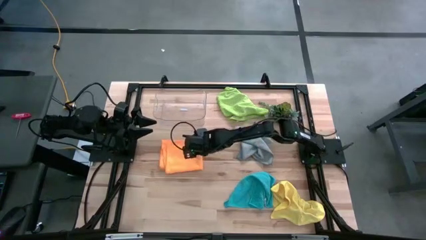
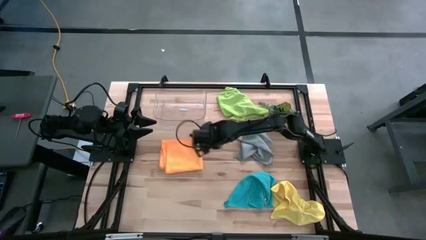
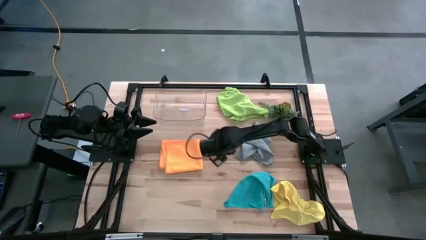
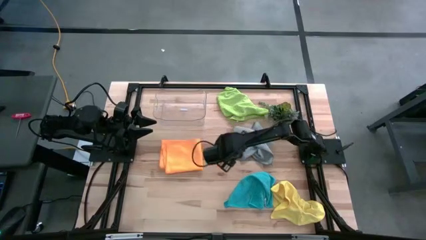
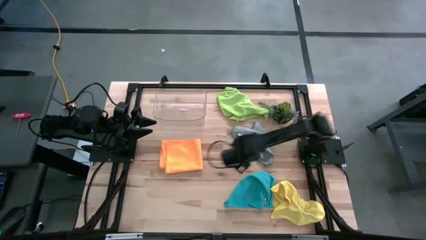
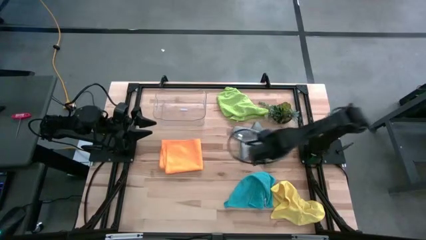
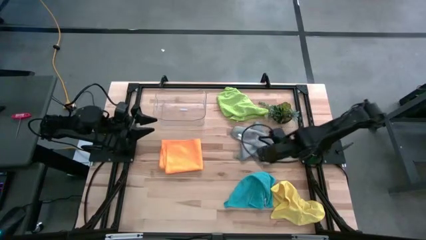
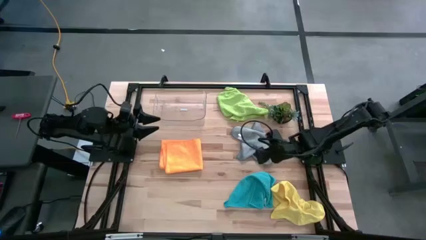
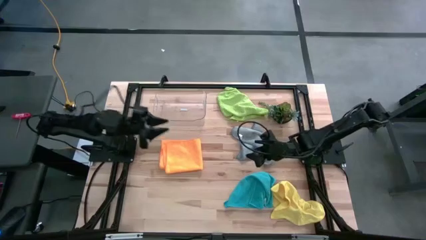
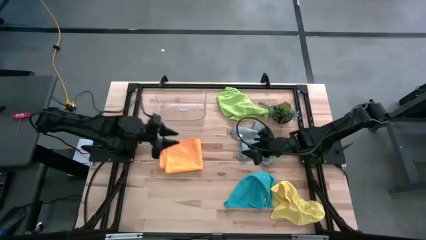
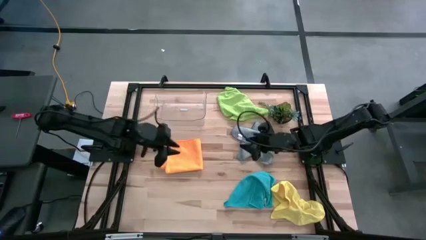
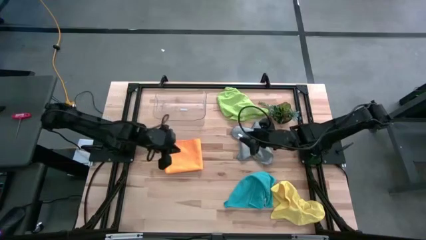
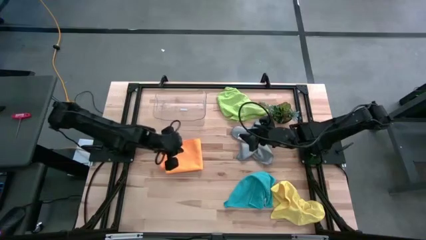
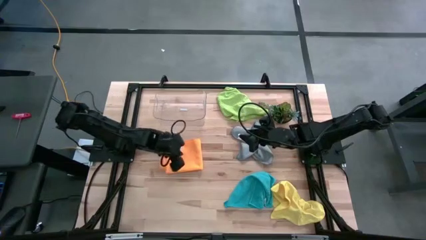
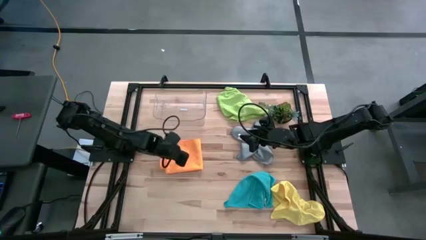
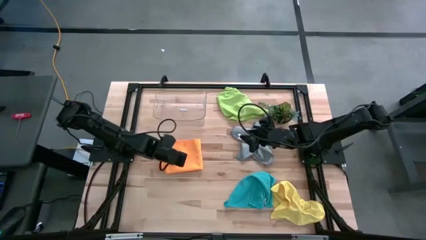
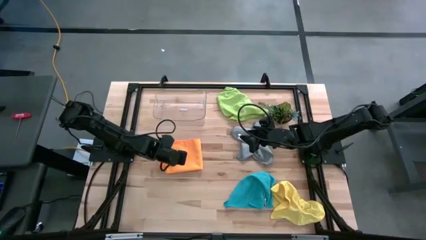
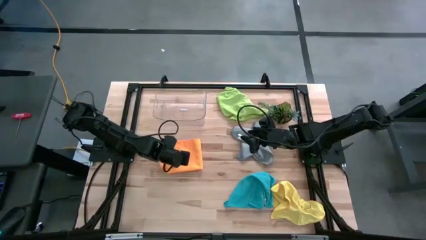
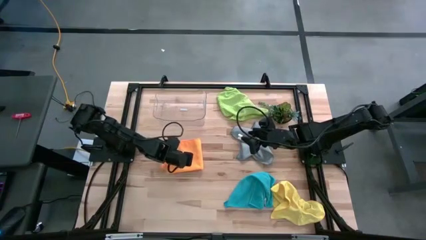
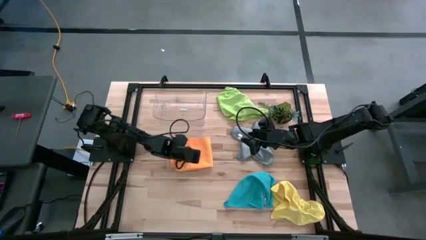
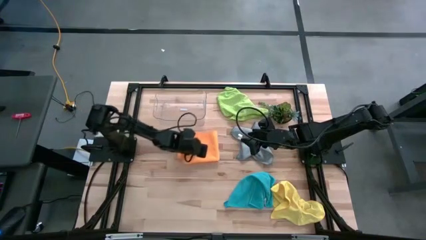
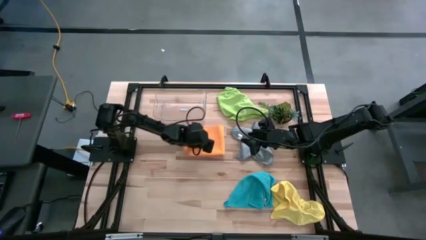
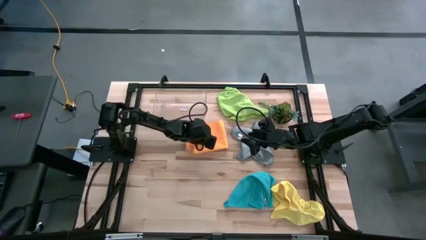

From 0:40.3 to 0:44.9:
Task: Fold microfiber towels
Adjust the orange towel

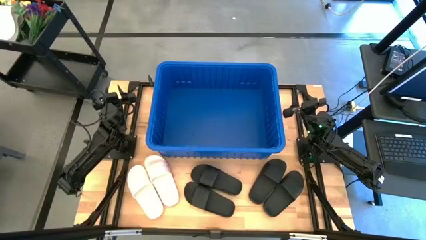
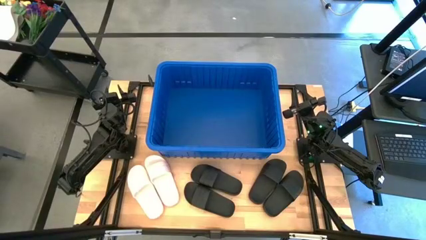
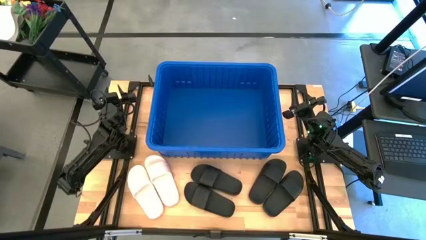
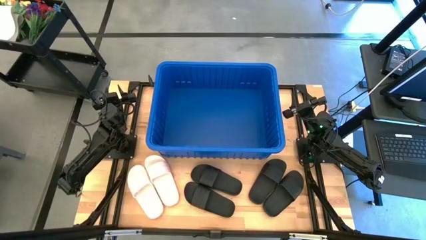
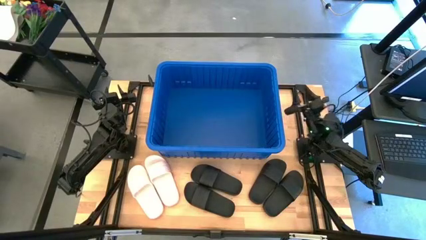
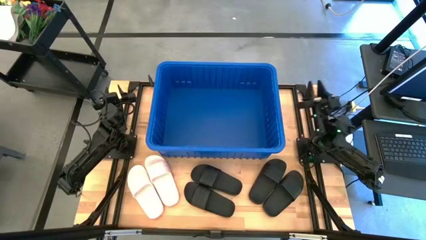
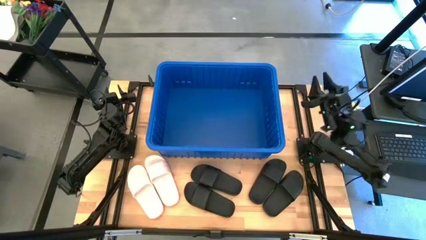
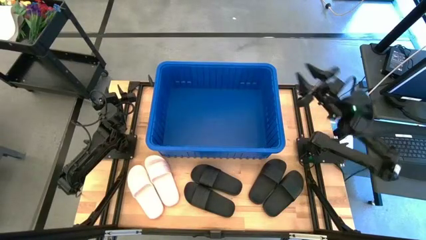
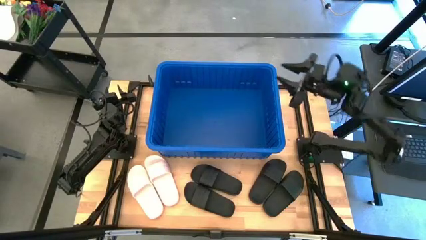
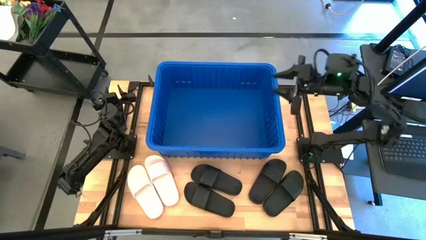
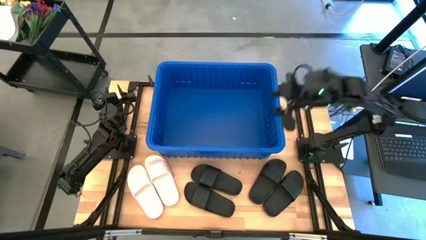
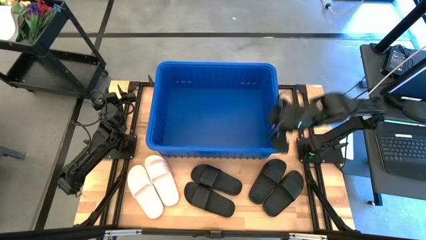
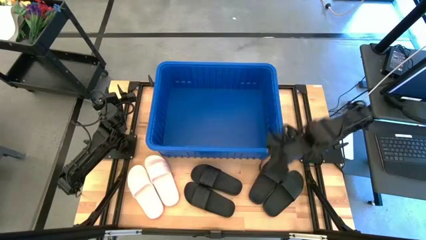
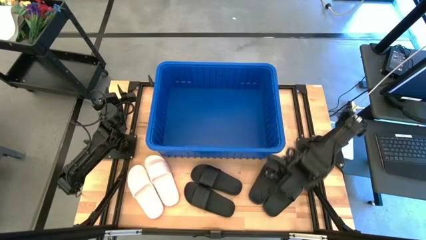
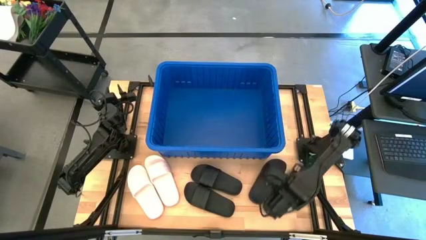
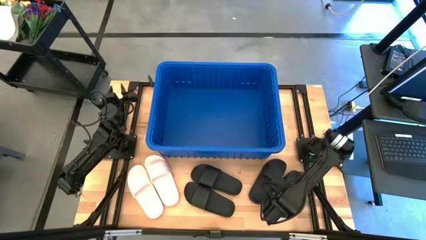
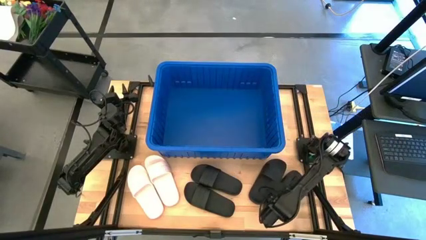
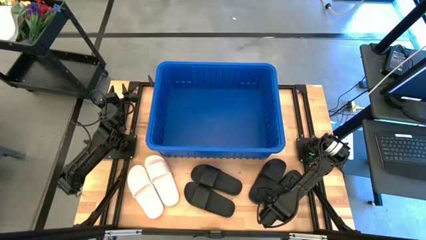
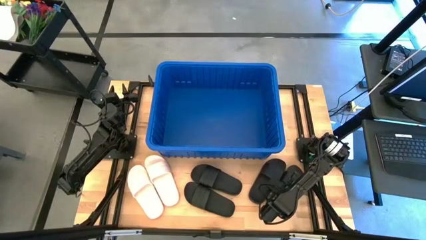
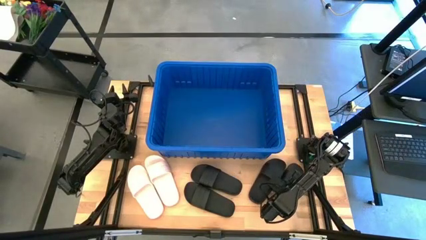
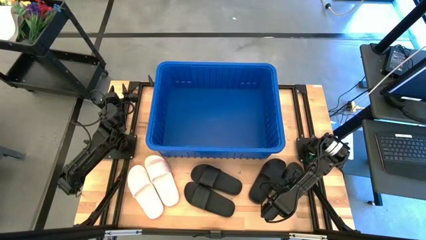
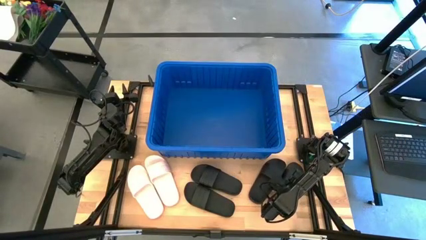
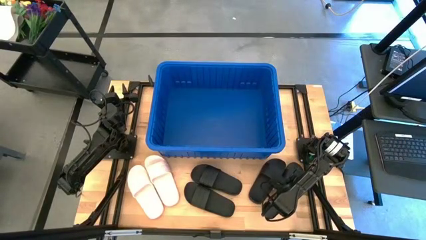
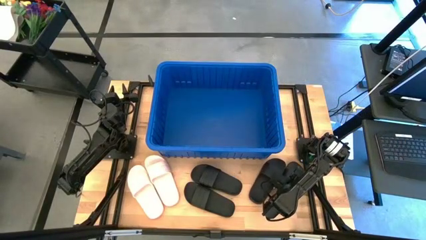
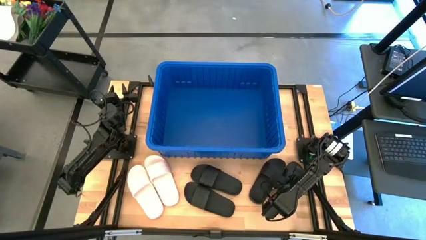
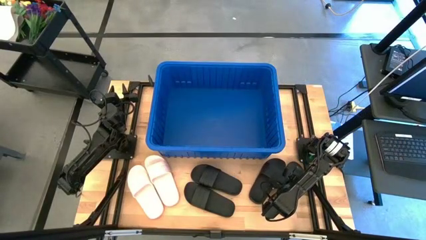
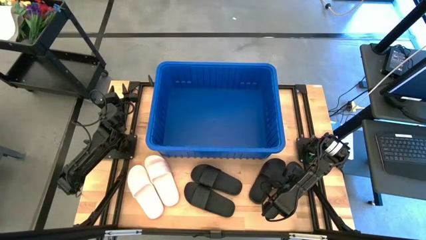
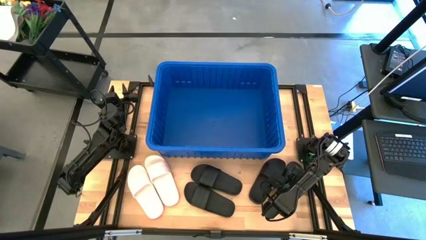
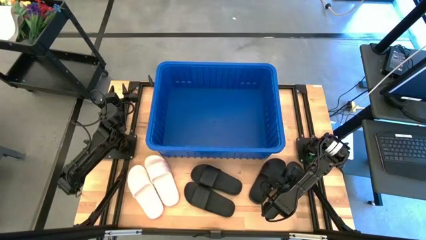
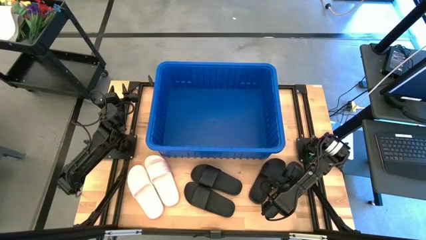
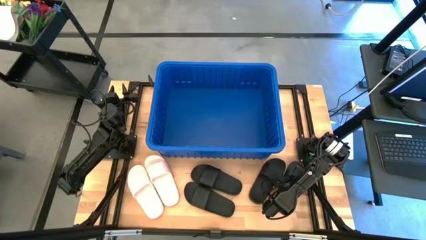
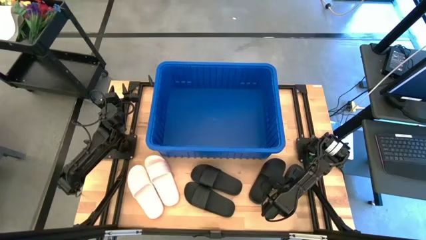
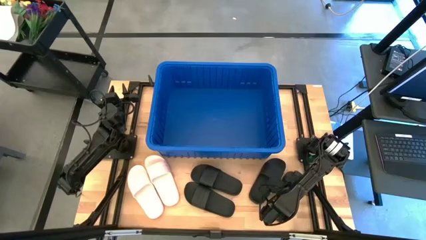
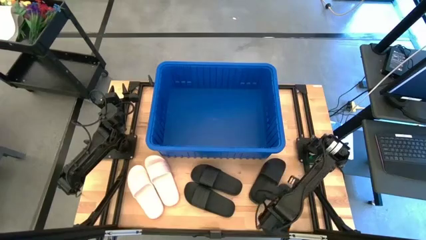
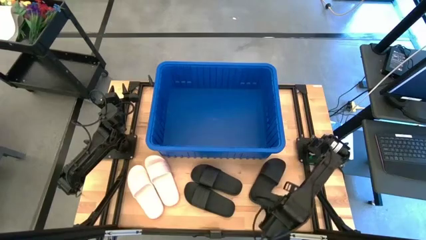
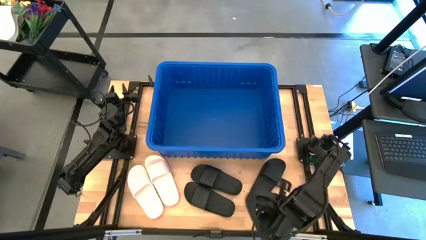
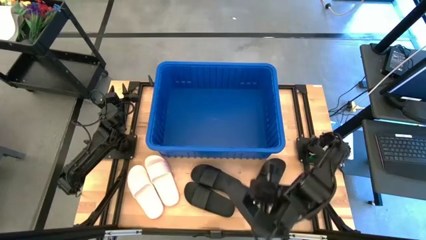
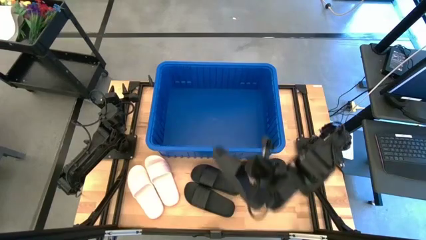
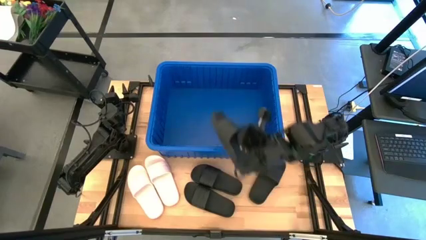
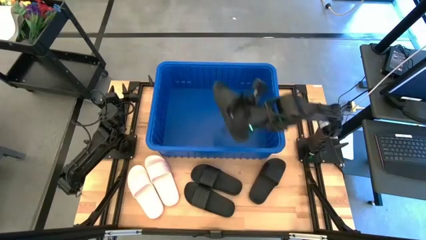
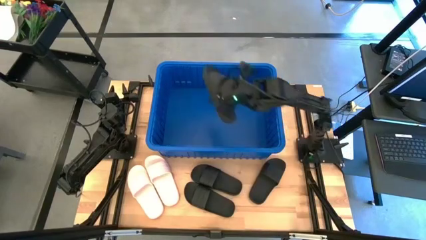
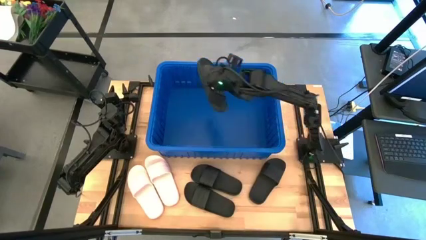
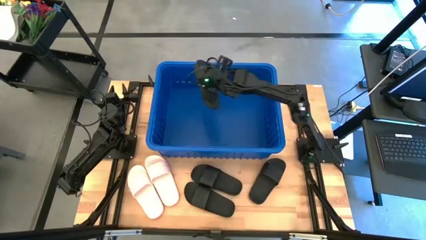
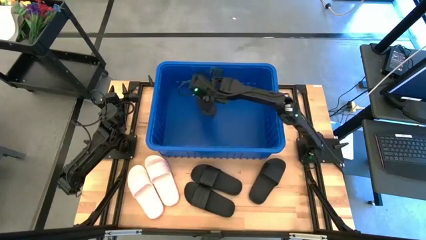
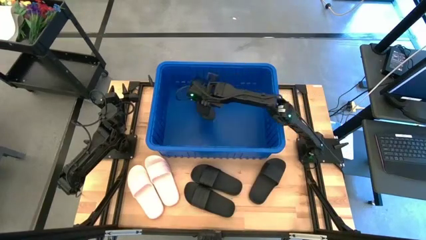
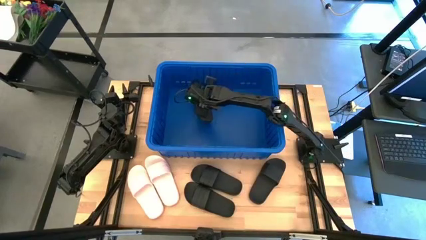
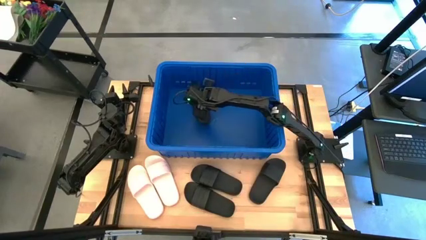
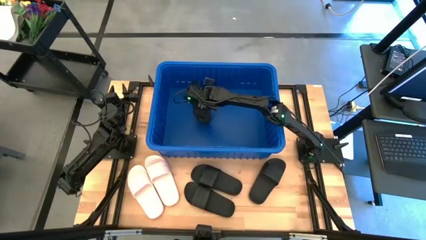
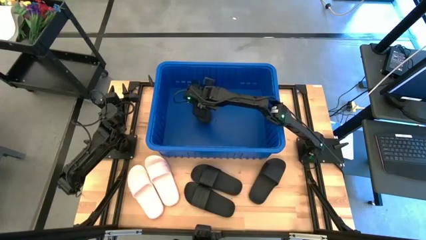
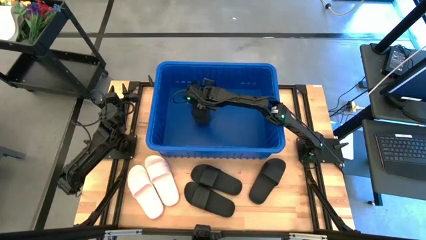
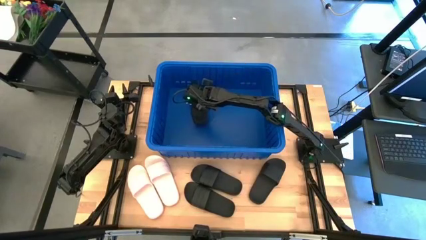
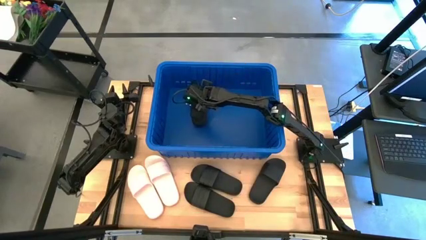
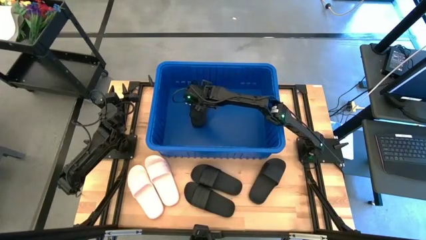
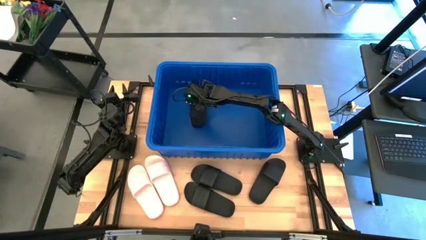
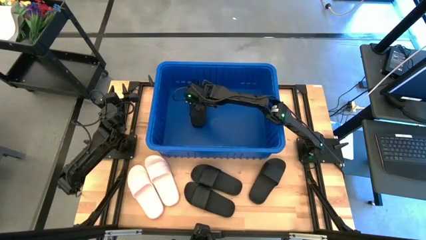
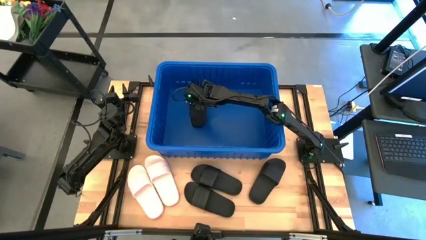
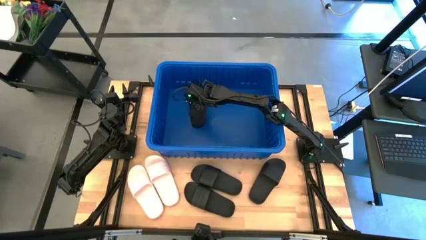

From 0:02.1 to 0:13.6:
Task: Pick and place slides into bin
Put the black slide into the blue bin
